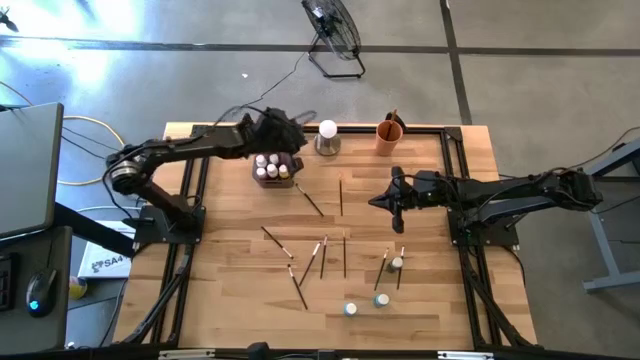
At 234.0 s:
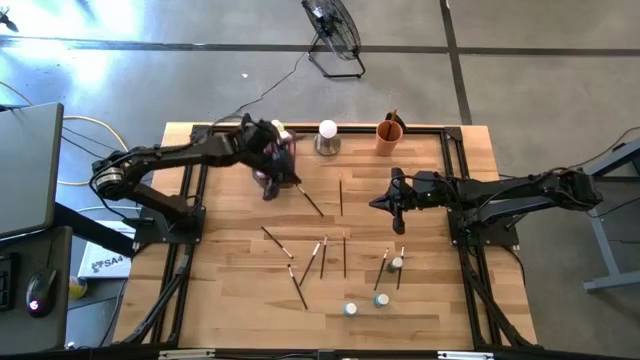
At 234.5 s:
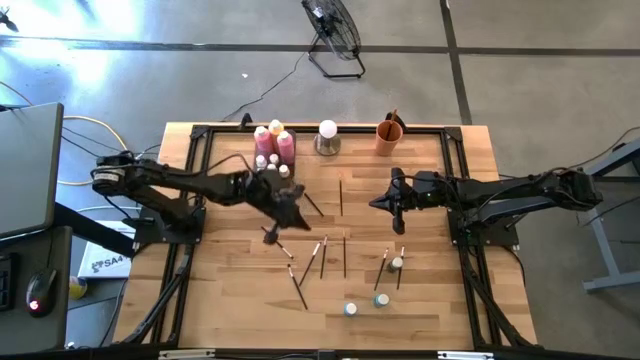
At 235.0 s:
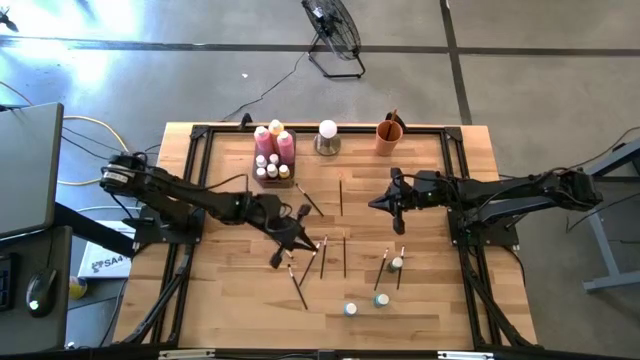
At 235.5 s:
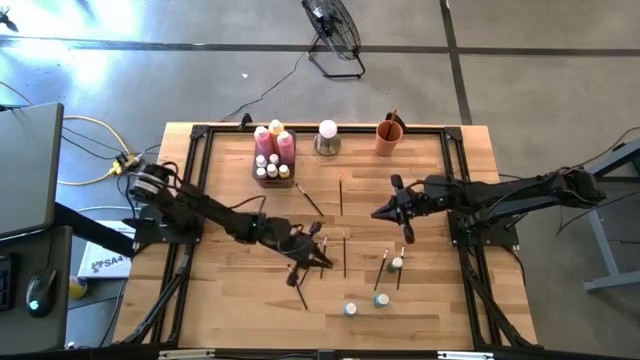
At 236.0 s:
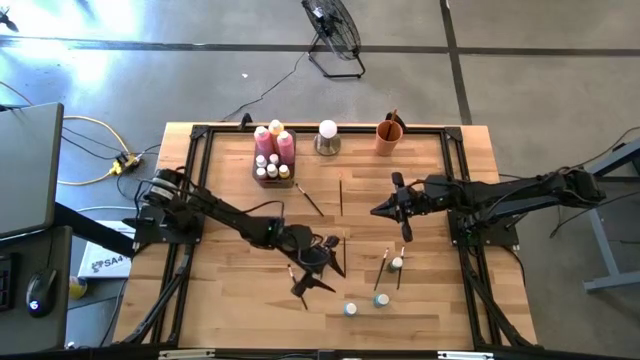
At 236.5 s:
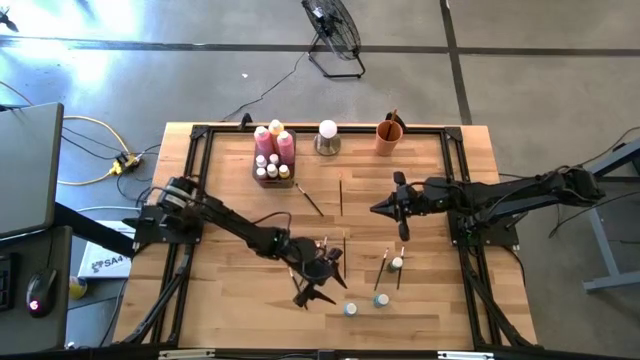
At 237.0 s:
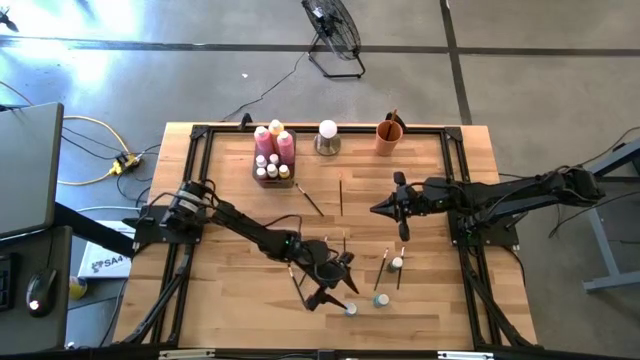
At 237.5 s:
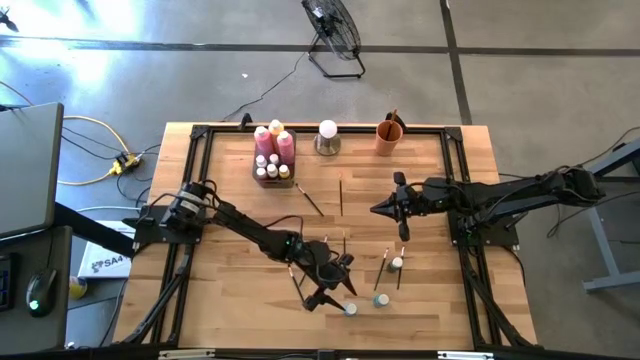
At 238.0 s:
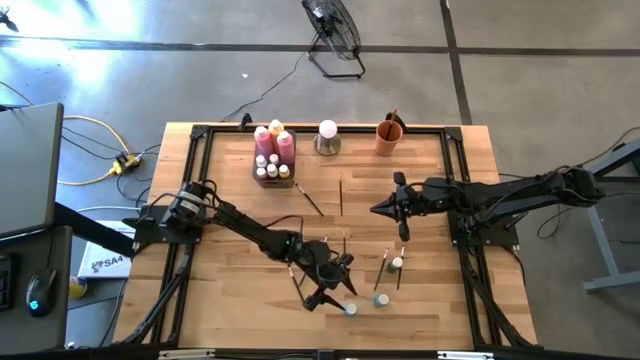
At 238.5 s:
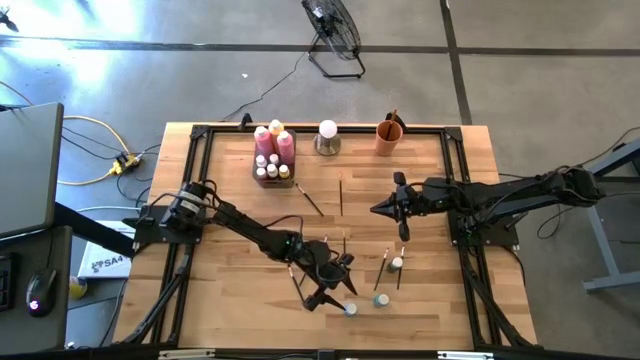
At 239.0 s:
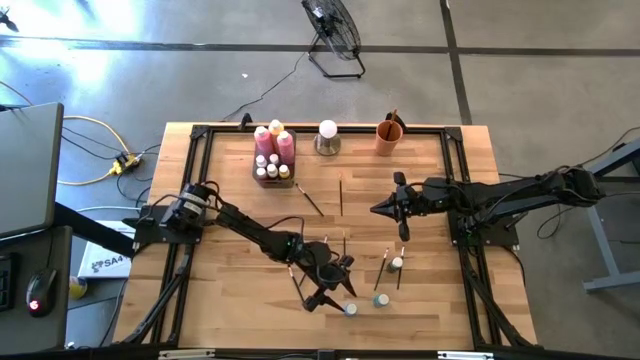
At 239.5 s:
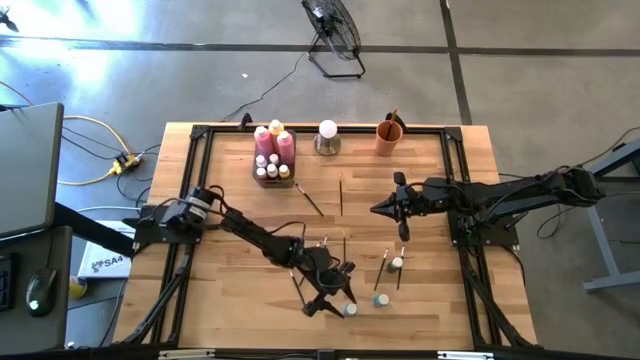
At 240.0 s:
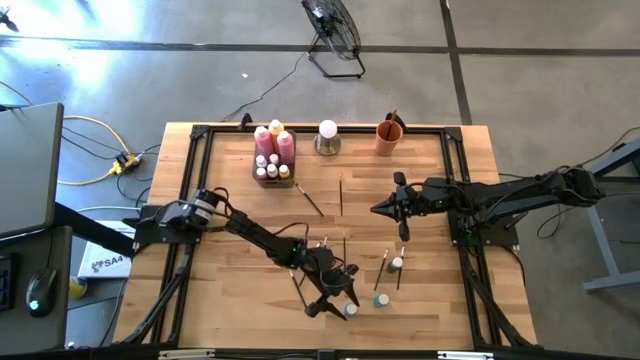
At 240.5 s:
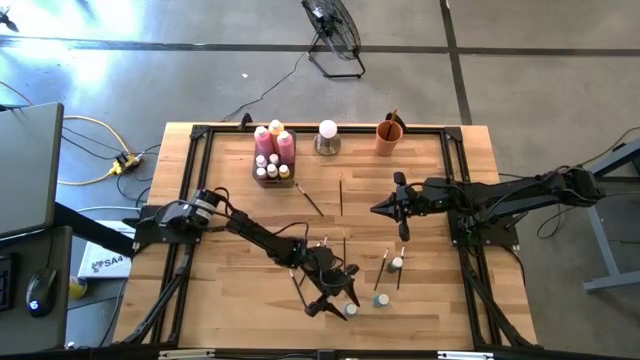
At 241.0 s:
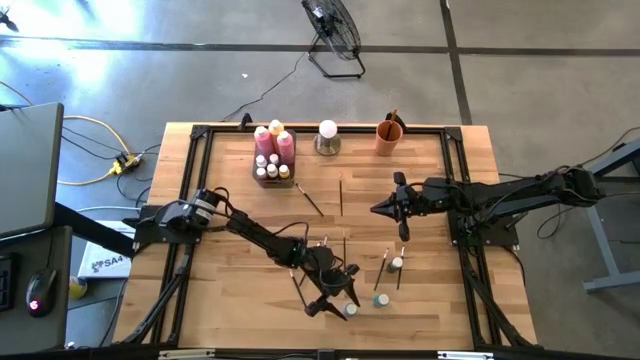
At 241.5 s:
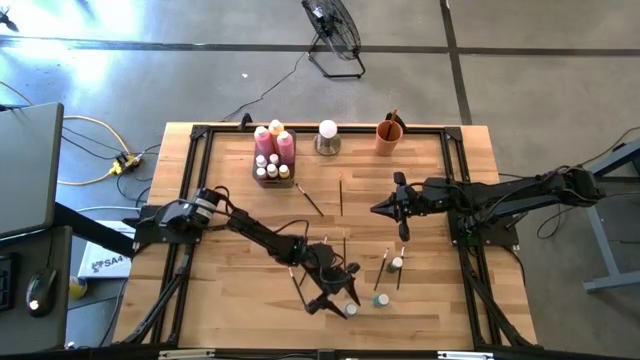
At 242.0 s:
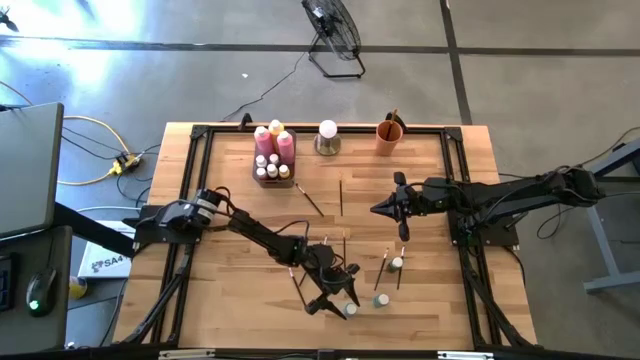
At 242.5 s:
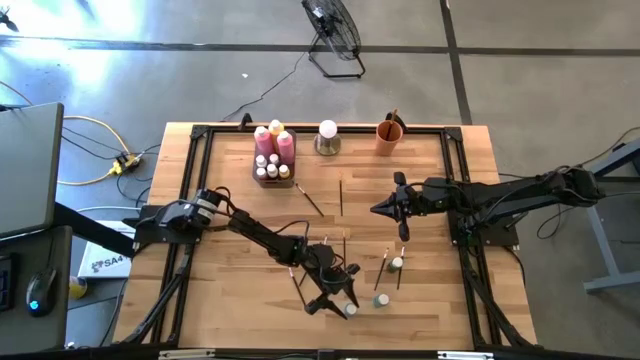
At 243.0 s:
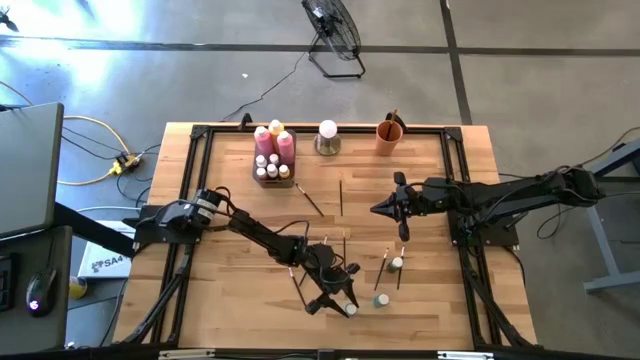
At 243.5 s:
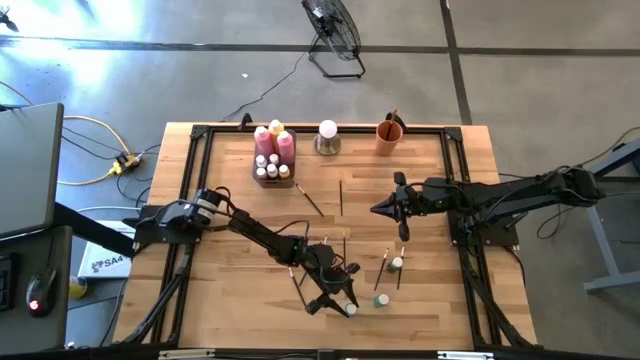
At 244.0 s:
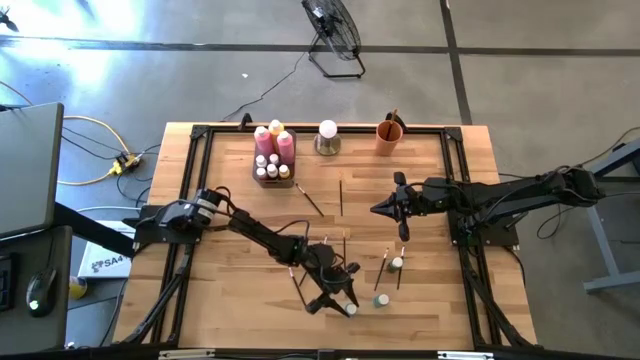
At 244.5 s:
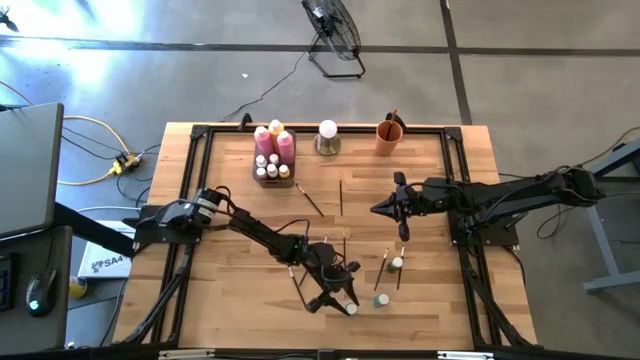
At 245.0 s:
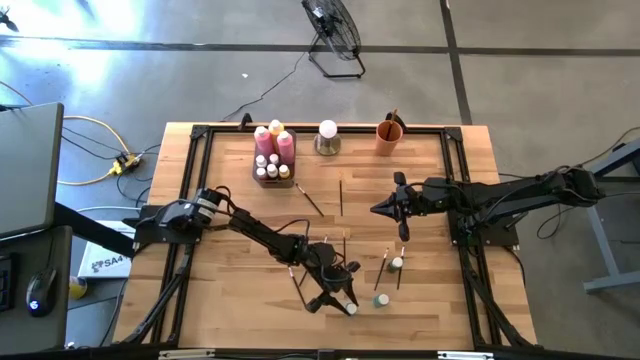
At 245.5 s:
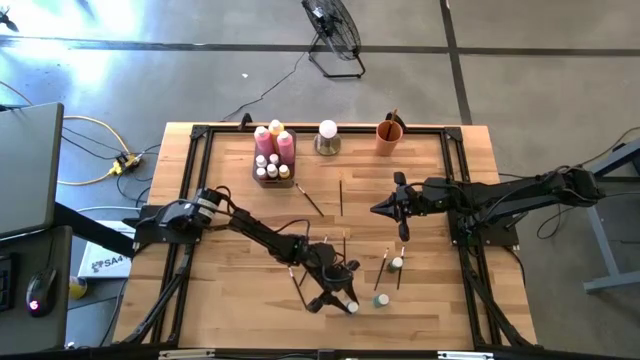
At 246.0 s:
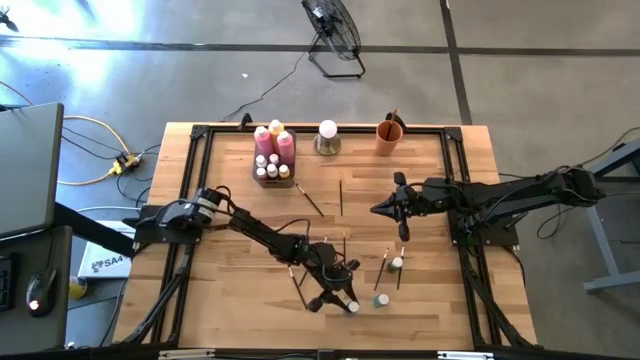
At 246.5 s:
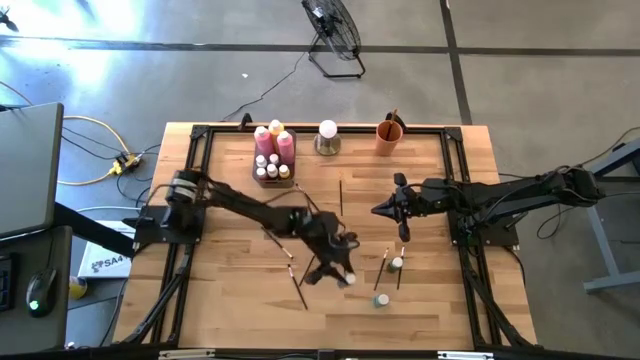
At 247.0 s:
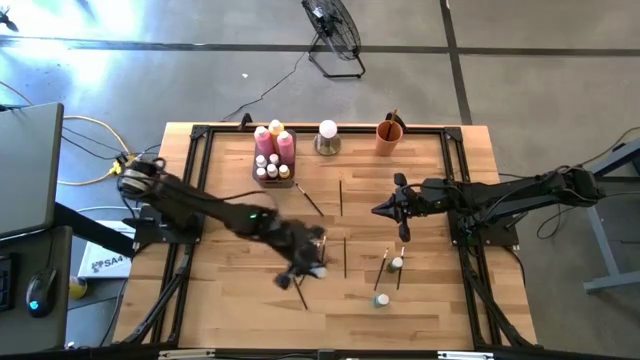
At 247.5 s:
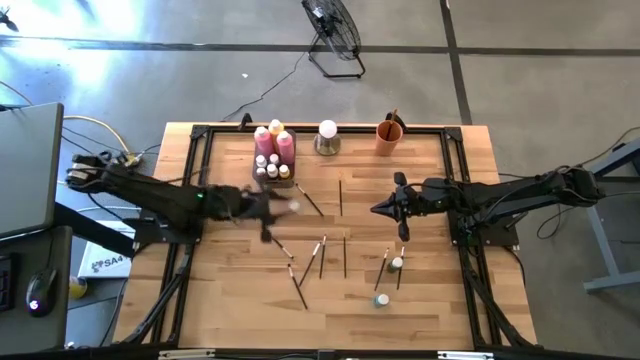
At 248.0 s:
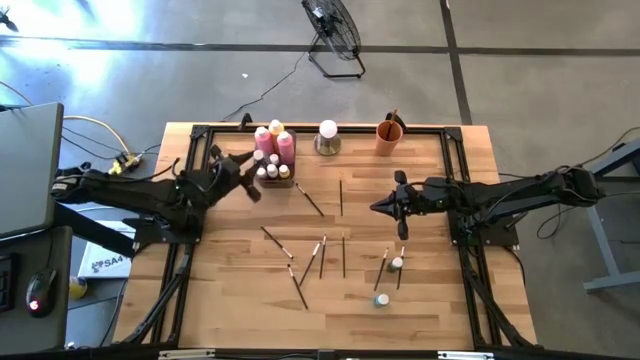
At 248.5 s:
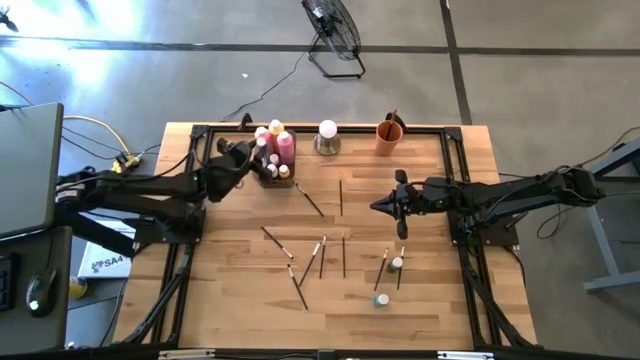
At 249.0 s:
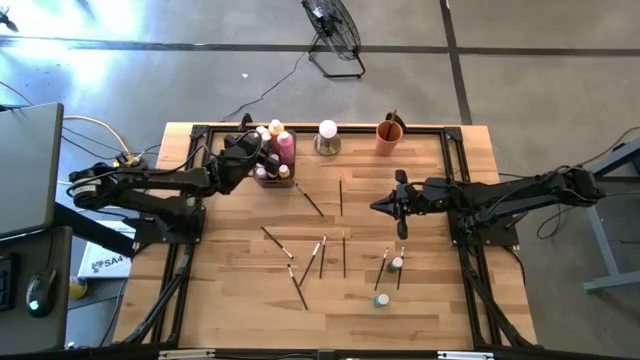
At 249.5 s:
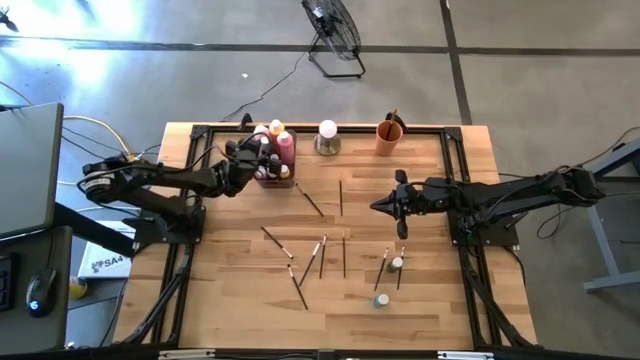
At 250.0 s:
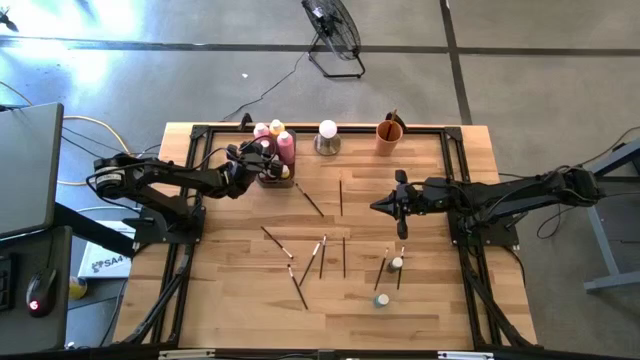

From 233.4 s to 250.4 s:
Task: Pick & Place Paint Supplies
Put the left small blue paint bottle into the gray bin

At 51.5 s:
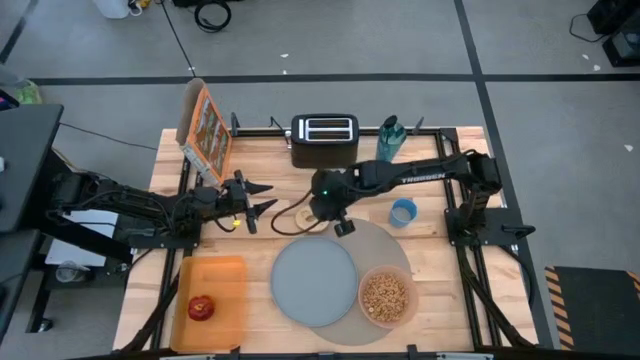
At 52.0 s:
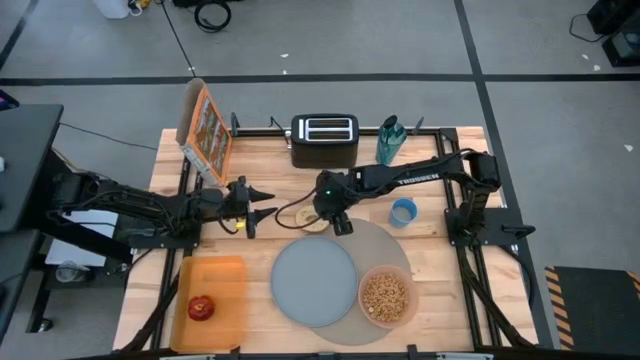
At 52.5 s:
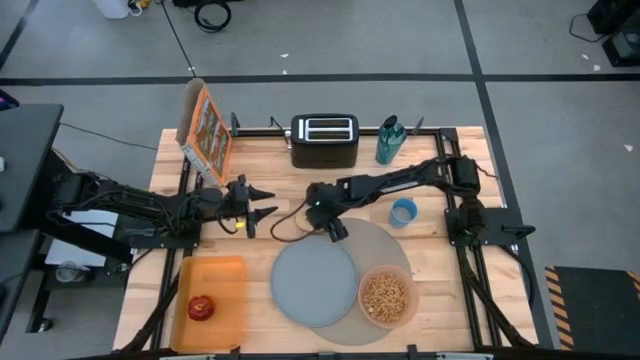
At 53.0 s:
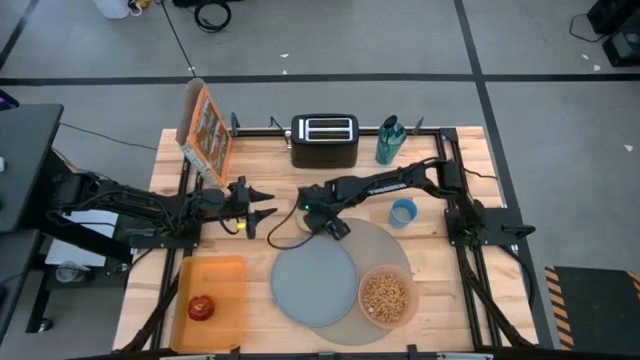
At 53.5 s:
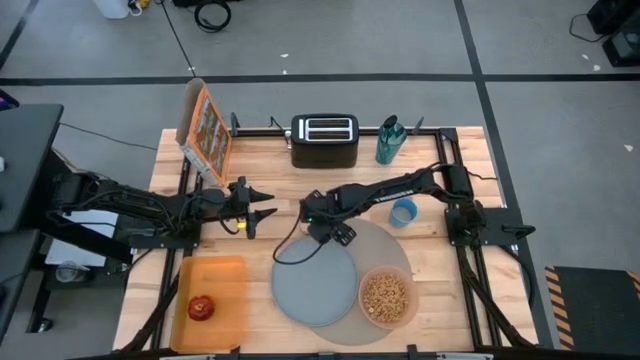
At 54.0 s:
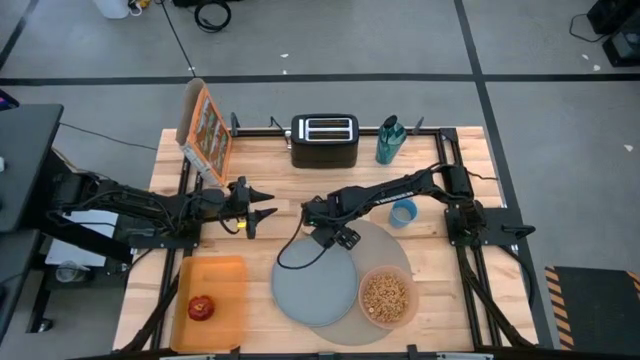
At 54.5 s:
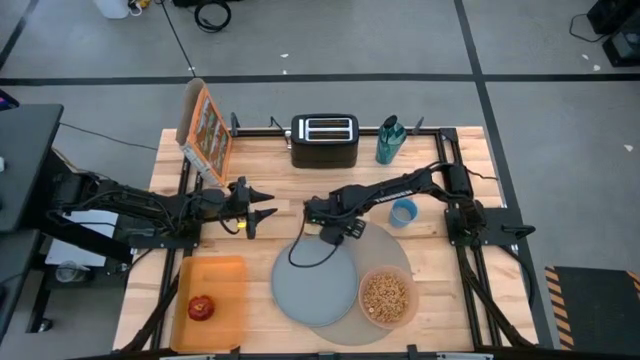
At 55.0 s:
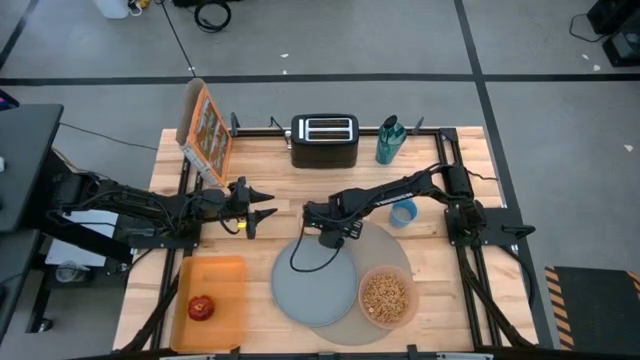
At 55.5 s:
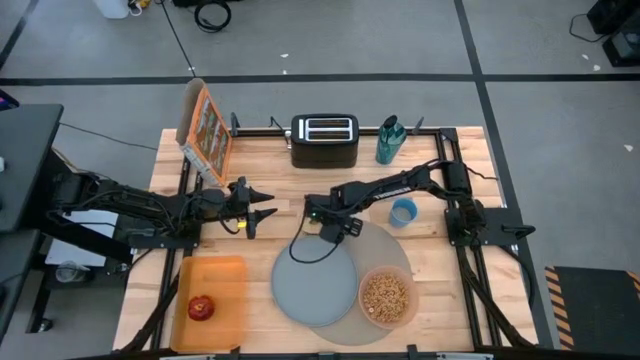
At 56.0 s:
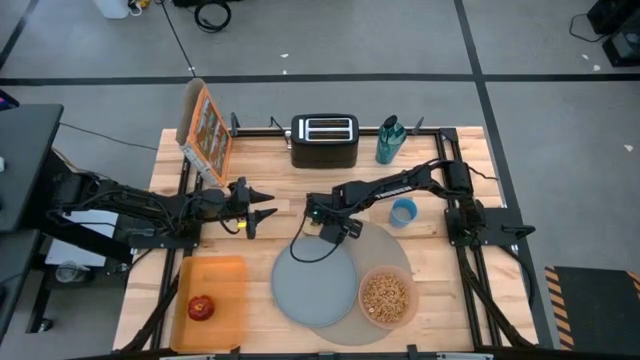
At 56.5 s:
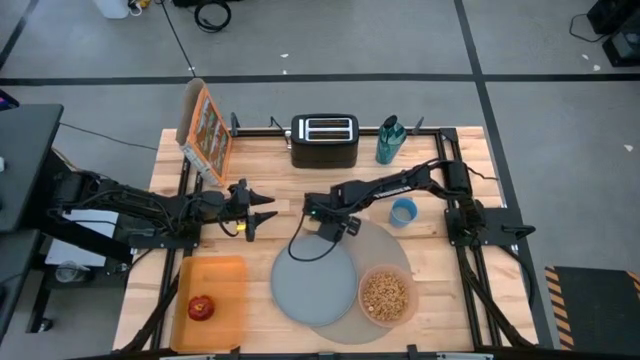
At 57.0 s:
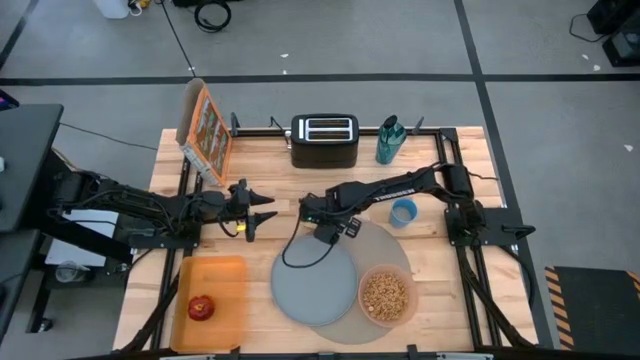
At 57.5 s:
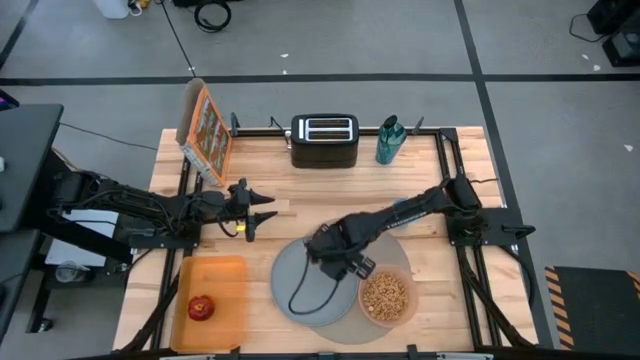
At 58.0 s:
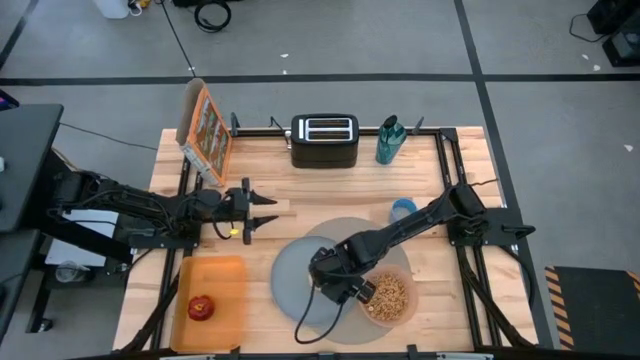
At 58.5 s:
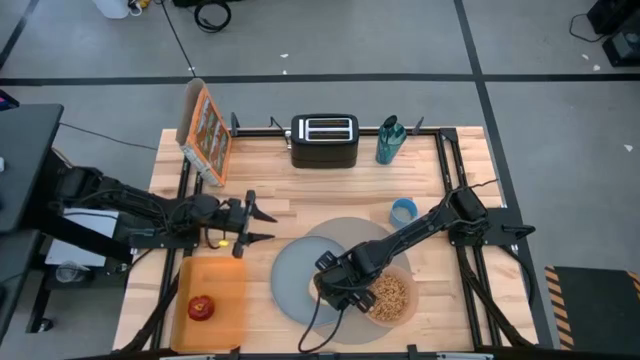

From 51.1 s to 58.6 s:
Task: Arrange a breakfast setting
Put the bagel on the blue plate from the toaster on the brown placemat
